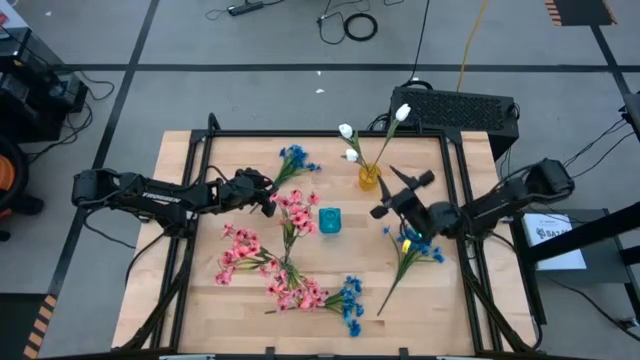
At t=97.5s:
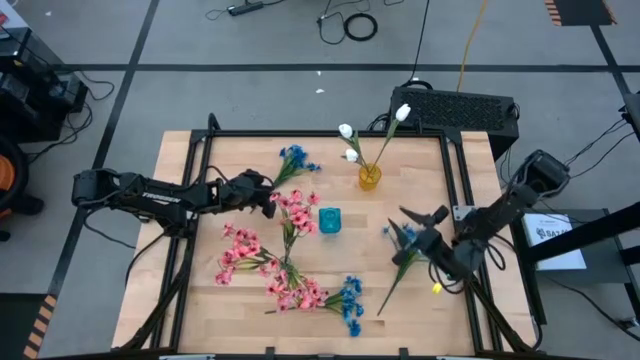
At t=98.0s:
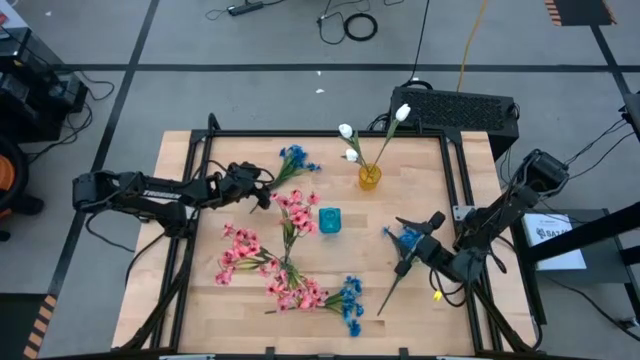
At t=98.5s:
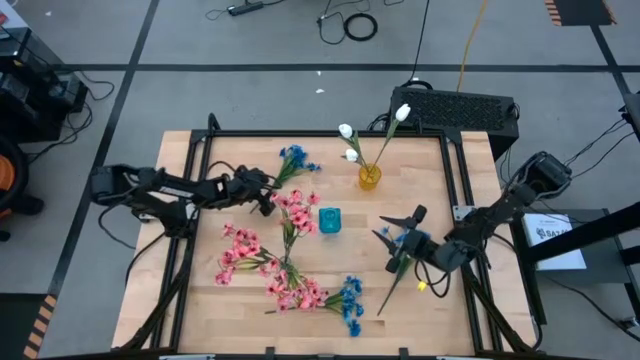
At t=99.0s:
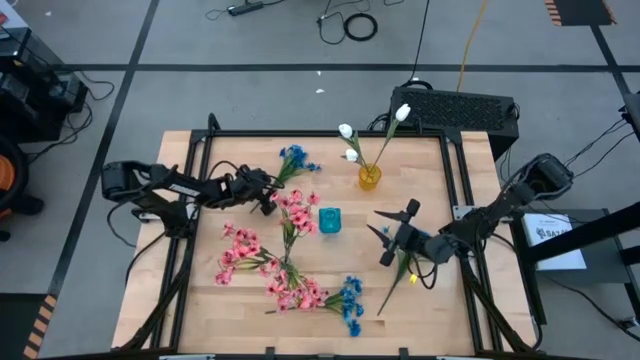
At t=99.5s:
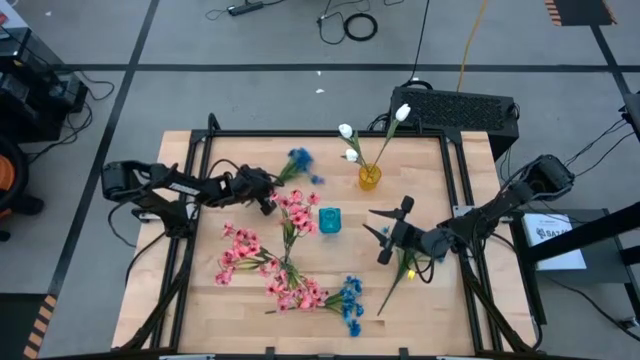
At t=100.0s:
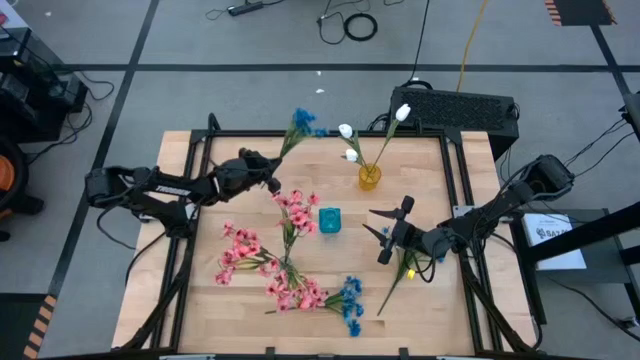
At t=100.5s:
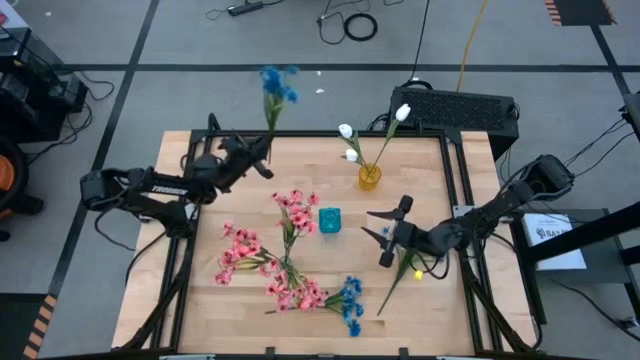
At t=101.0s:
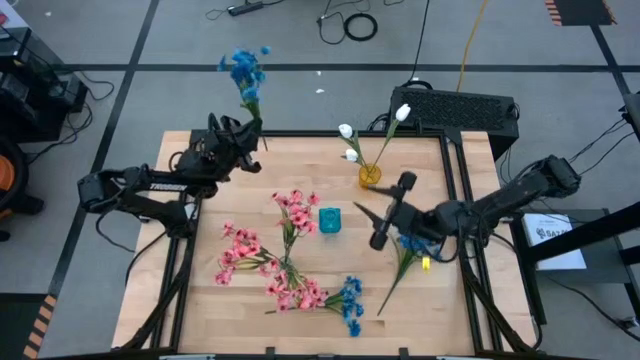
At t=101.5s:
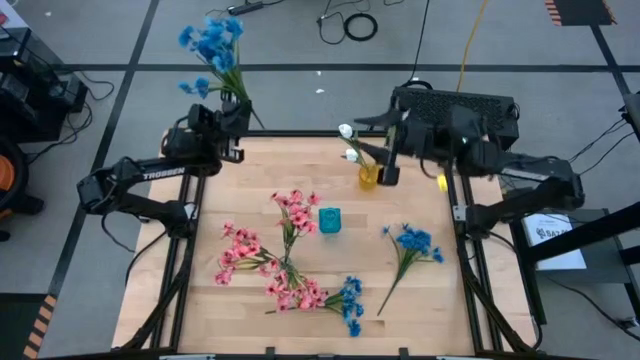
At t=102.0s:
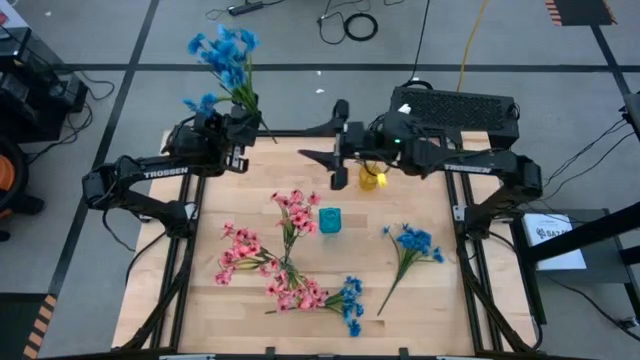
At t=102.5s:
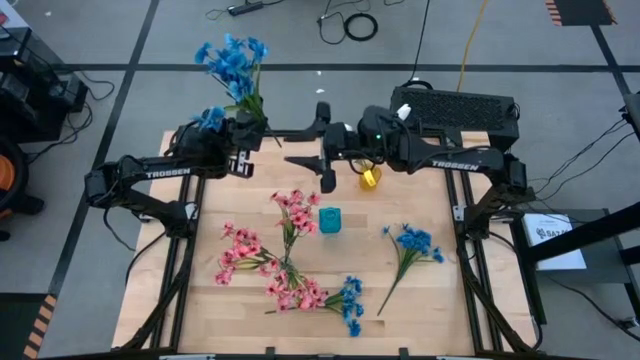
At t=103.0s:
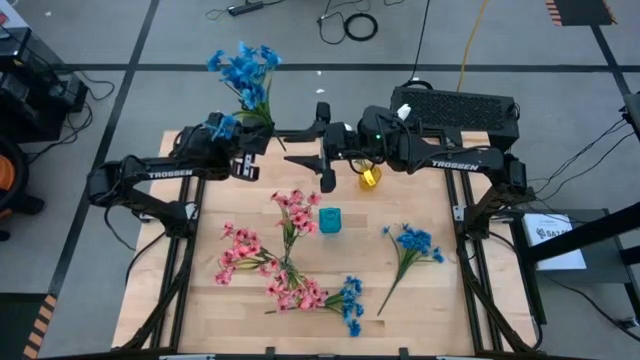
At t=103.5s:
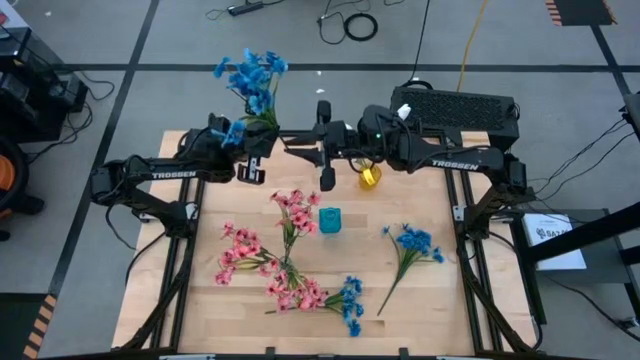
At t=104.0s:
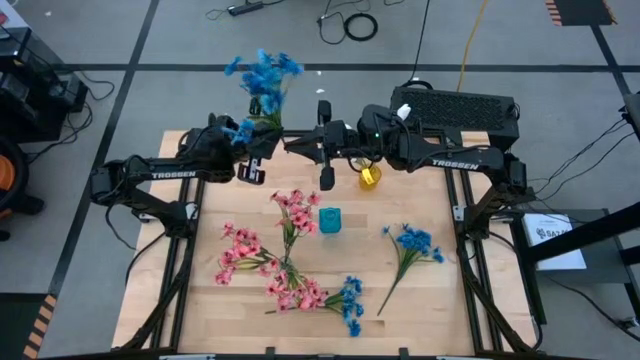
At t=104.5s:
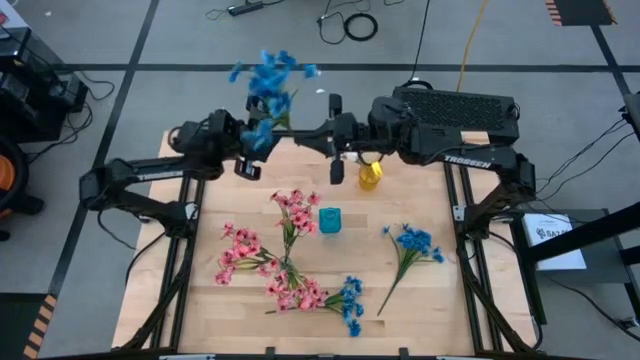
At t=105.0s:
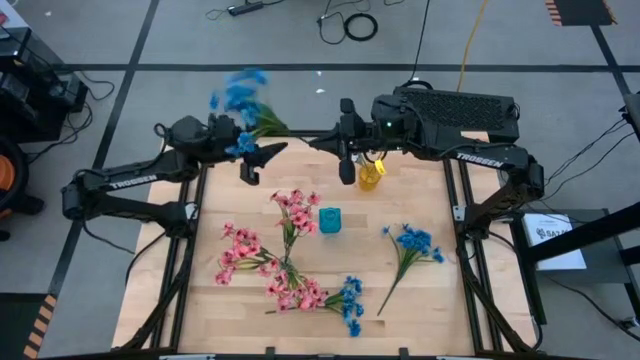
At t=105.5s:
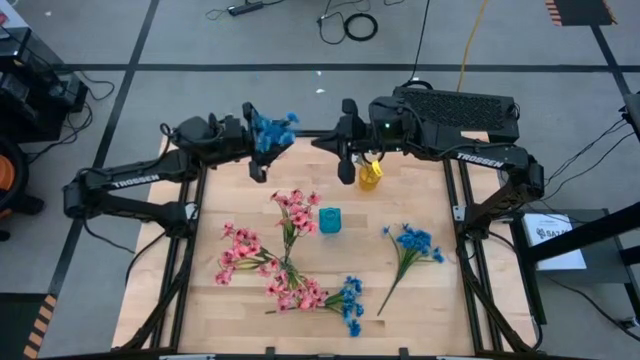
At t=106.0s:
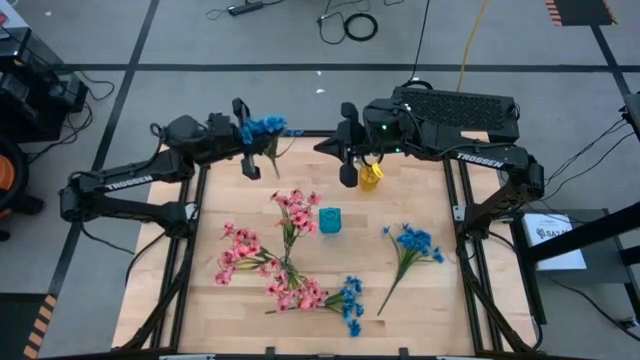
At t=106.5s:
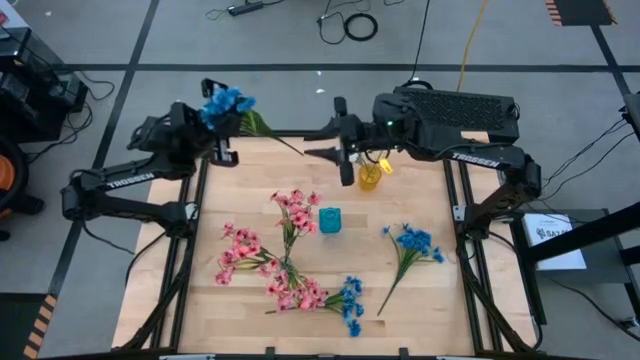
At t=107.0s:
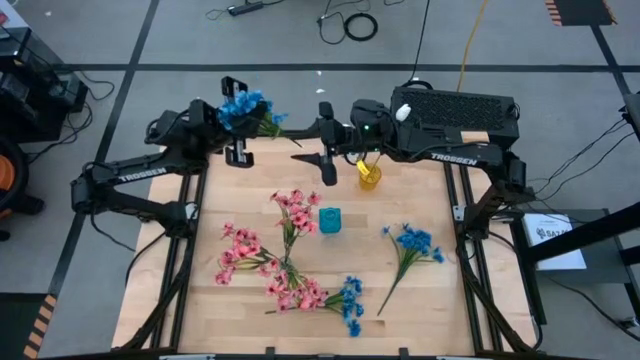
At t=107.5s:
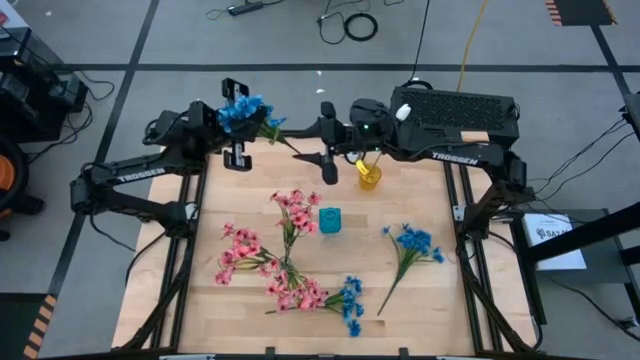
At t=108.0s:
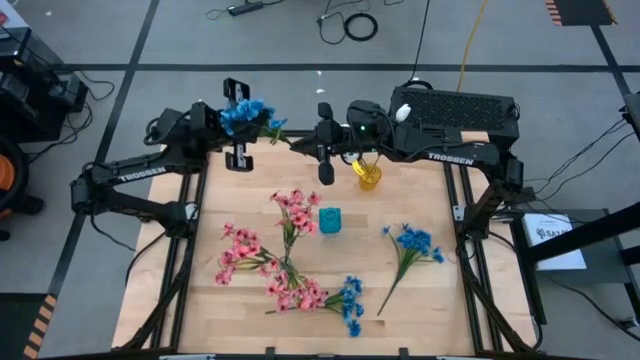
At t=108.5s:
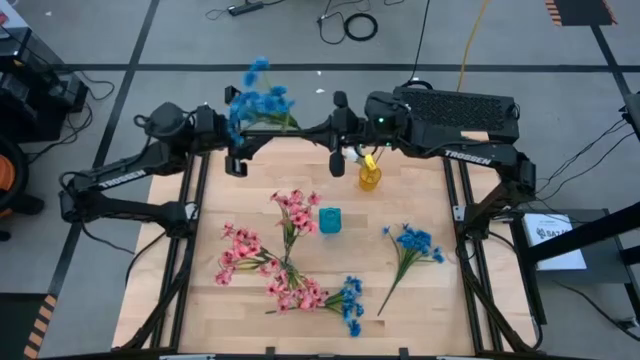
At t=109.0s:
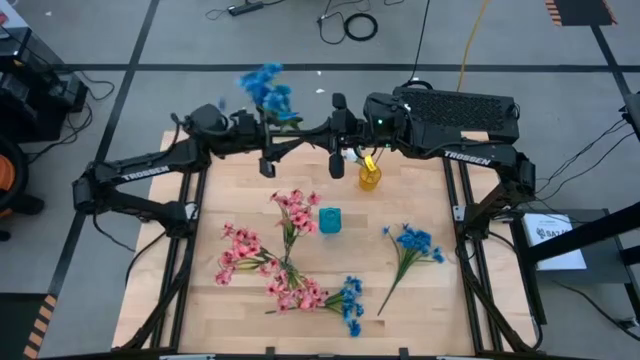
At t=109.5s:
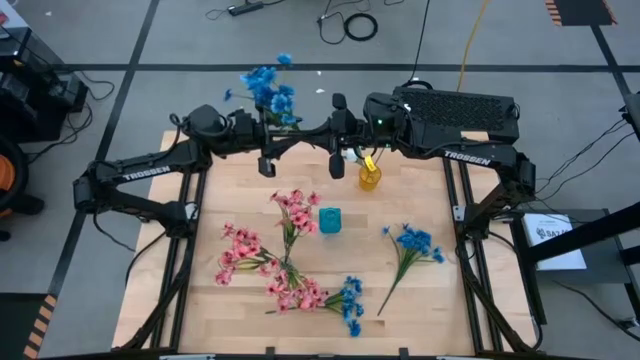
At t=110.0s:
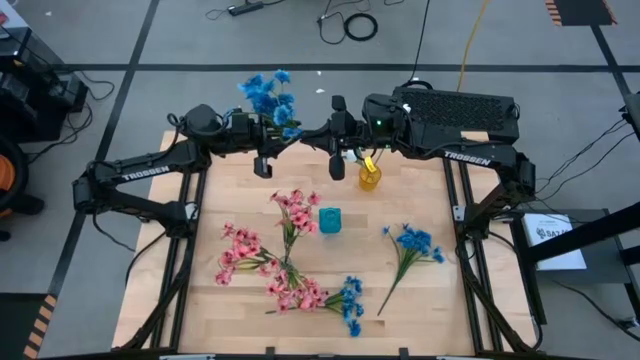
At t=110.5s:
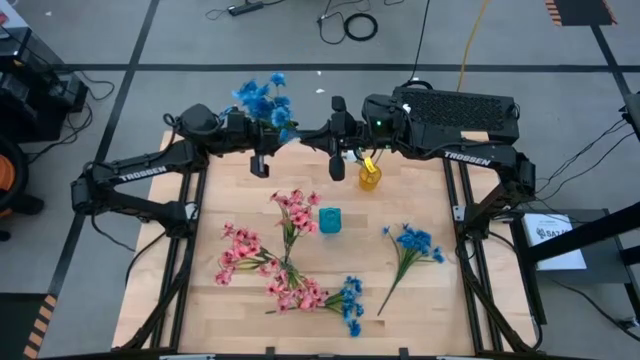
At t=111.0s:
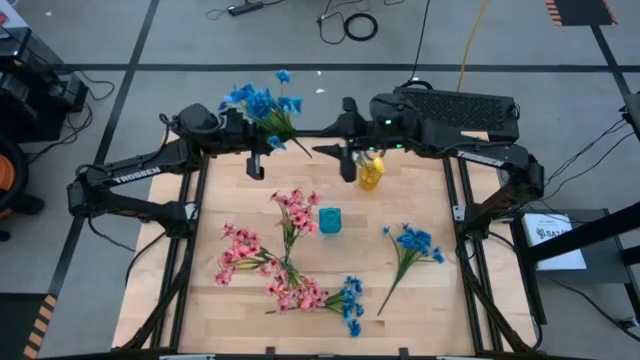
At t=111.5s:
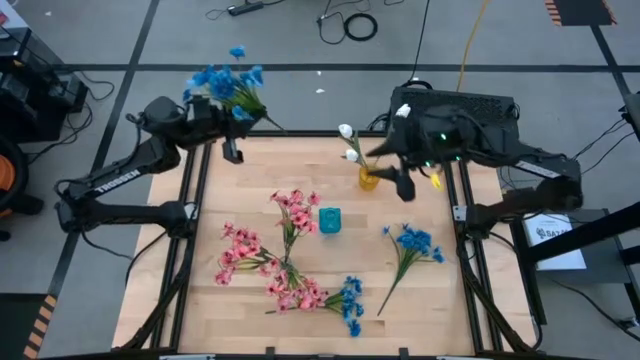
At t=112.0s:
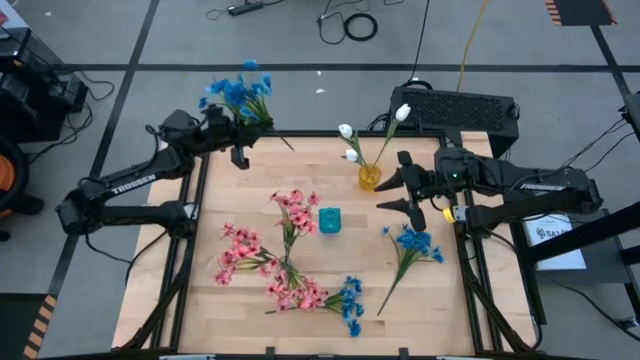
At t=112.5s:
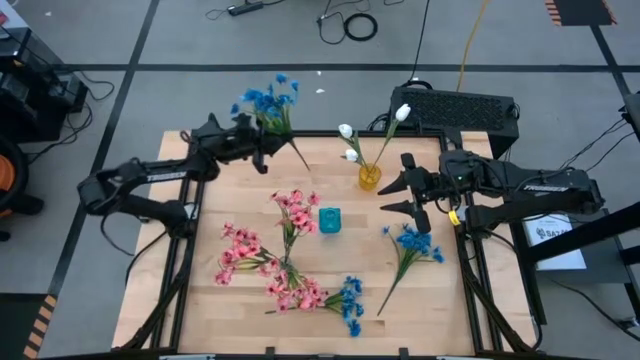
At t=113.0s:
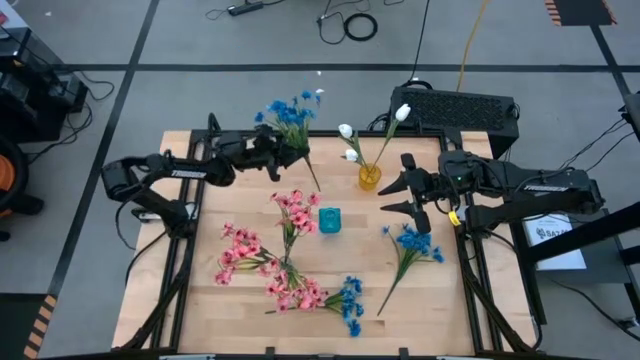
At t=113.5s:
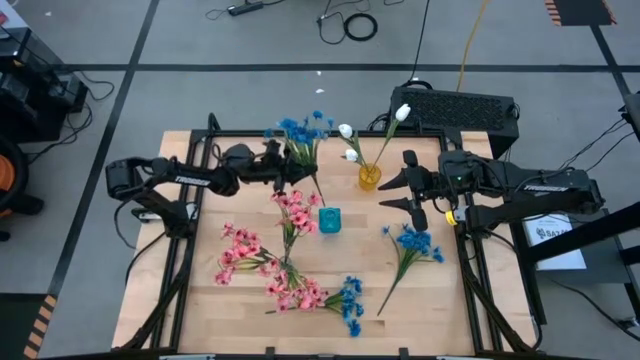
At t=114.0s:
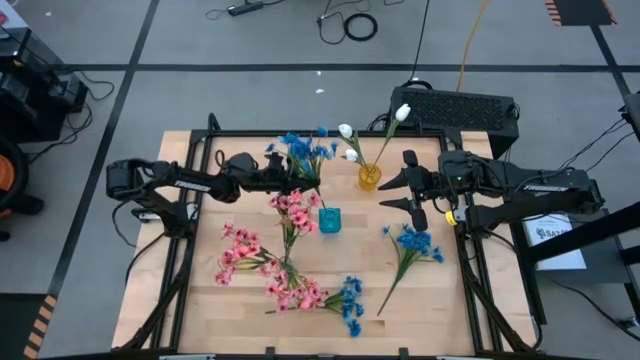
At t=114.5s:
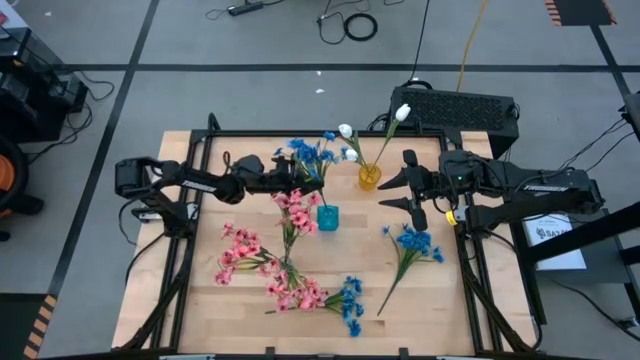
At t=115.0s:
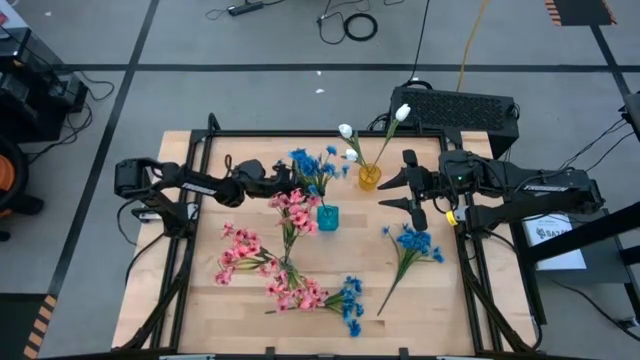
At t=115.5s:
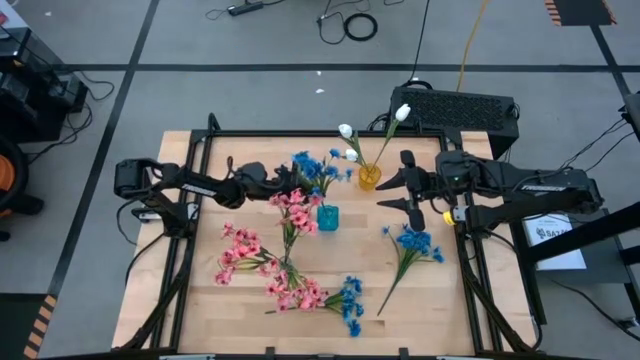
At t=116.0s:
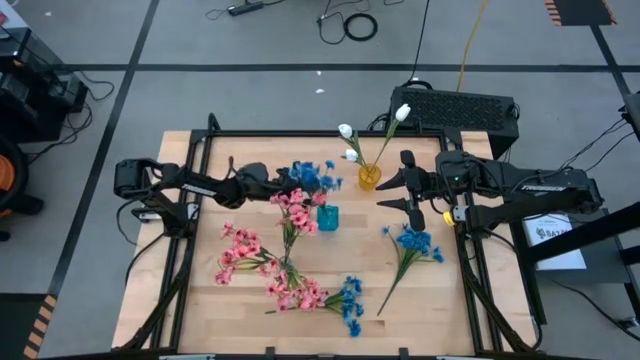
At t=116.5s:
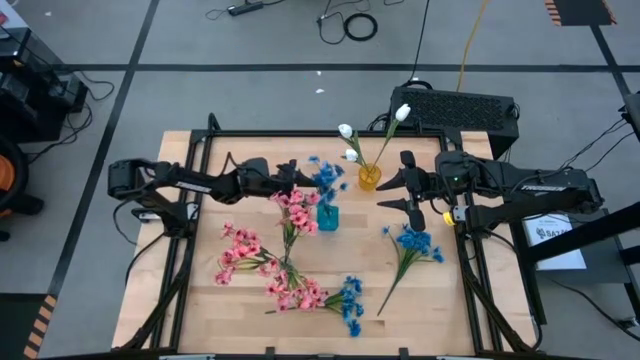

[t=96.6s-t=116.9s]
Task: Sort flowers into vase by color
Put the top blue flowers into the blue vase

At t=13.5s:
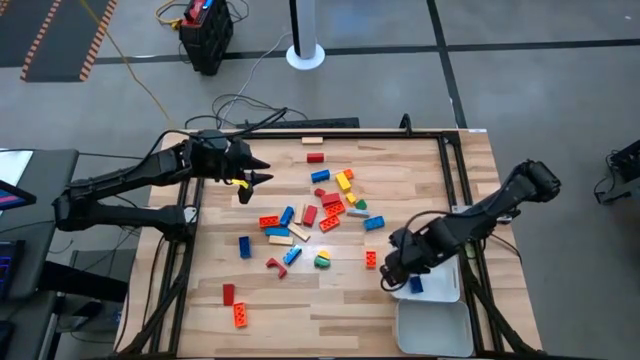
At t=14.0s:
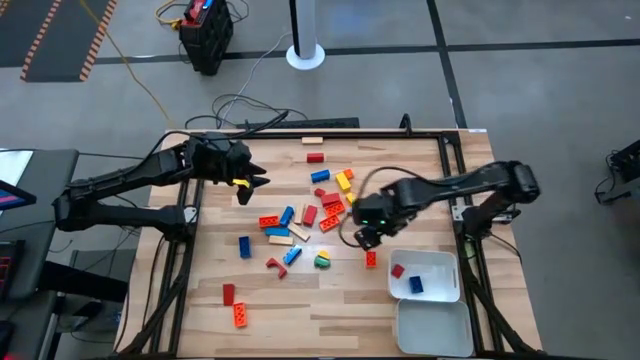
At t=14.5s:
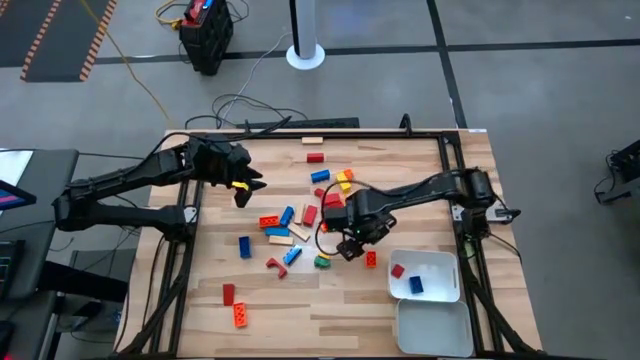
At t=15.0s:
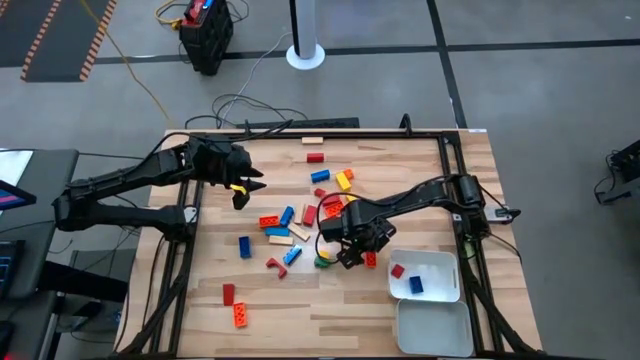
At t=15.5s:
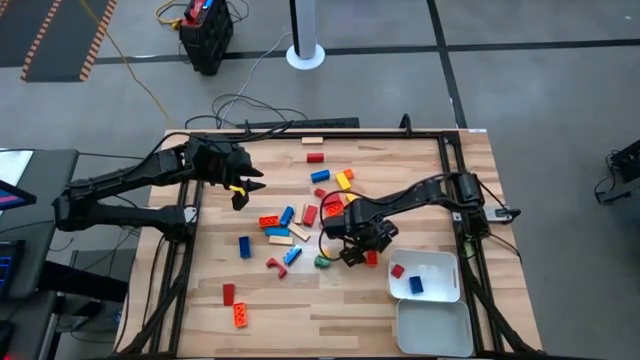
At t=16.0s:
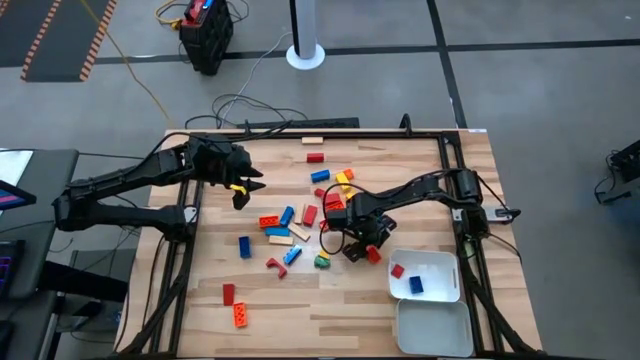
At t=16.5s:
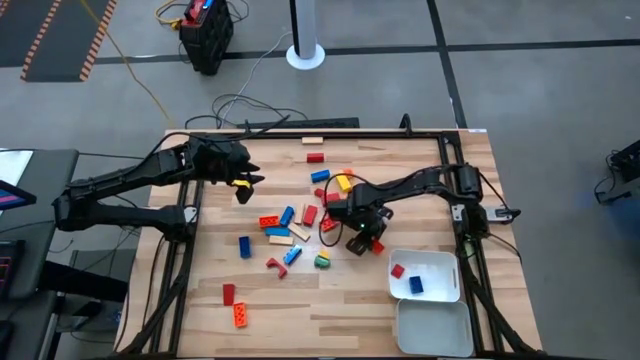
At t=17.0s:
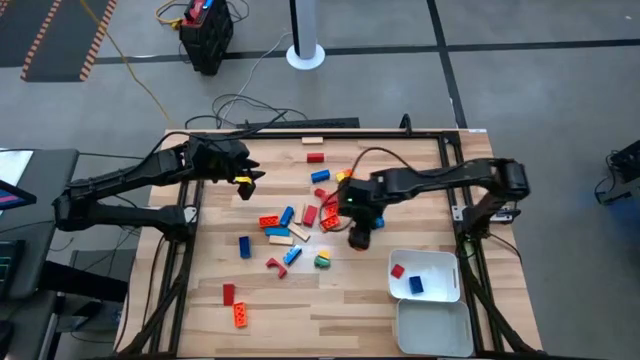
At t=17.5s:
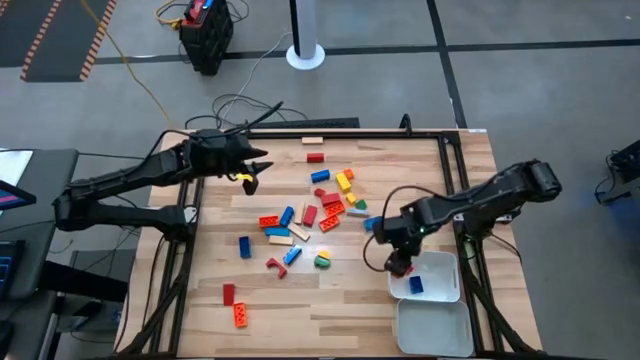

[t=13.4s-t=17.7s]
Task: Sort blocks by size
Put the small orange game piece into the white bin
